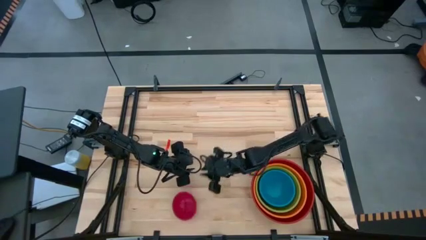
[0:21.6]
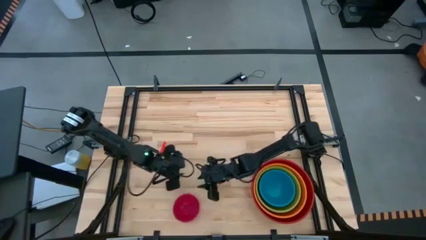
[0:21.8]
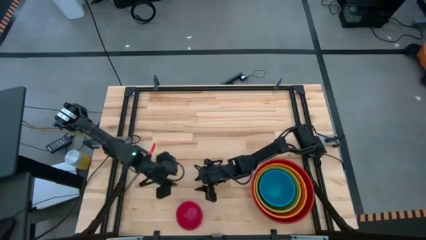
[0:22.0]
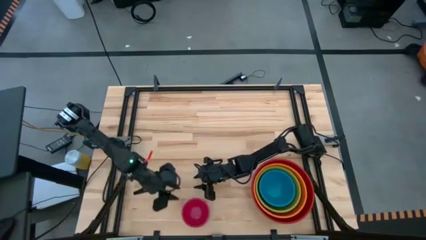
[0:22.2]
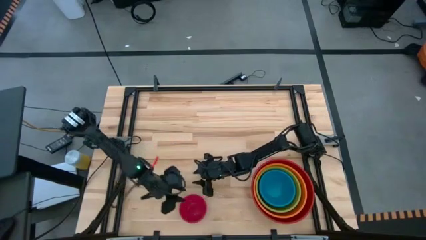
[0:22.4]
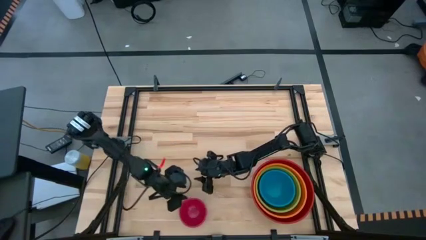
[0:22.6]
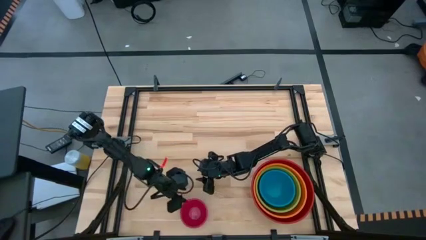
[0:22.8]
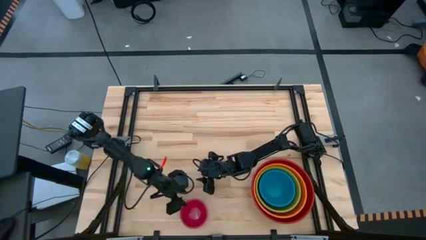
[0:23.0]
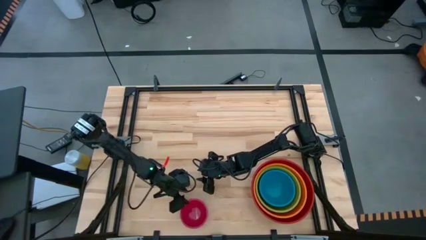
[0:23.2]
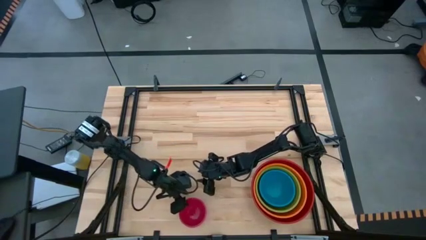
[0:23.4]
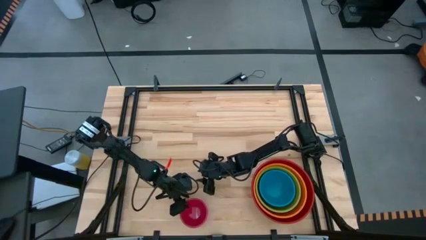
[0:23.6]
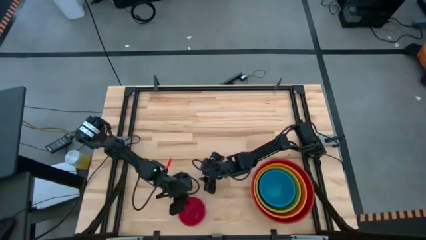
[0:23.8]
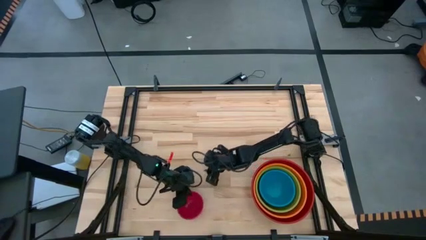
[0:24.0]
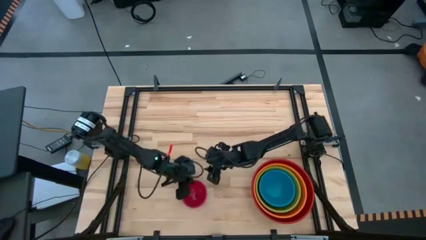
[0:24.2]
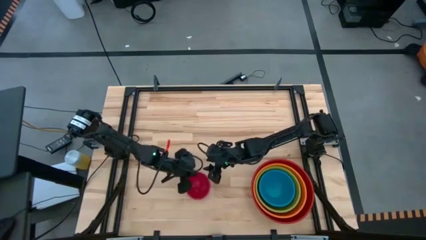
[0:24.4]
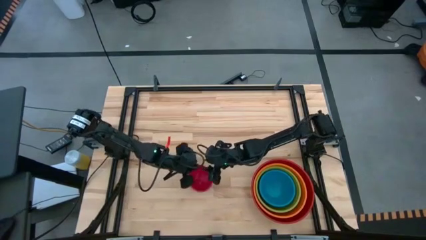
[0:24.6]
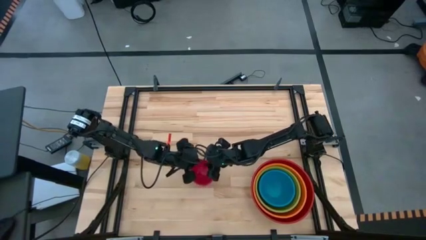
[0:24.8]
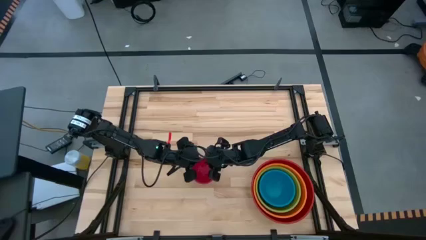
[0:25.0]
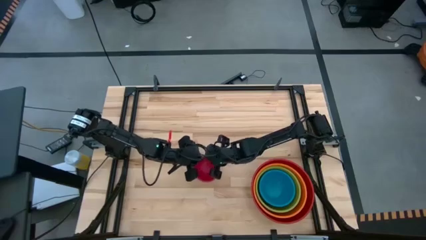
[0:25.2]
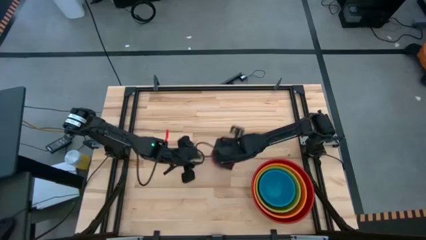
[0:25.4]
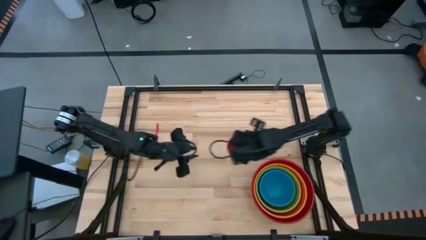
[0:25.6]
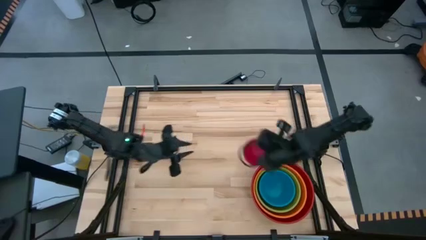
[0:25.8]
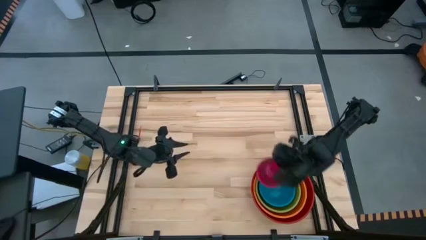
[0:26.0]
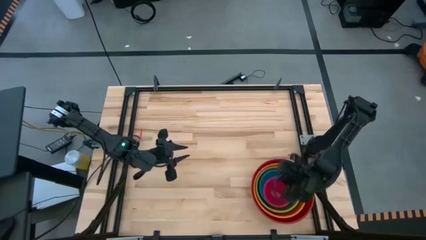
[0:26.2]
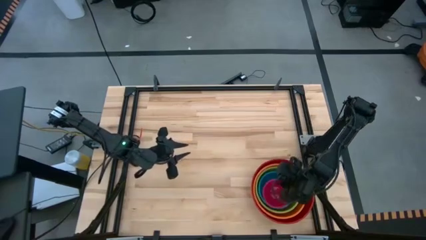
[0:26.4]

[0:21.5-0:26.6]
Stack the pink bowl on top of the blue bowl

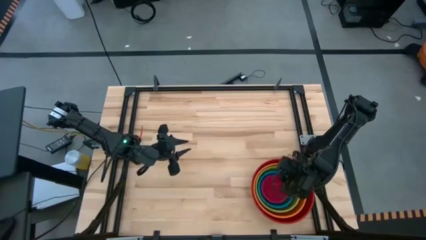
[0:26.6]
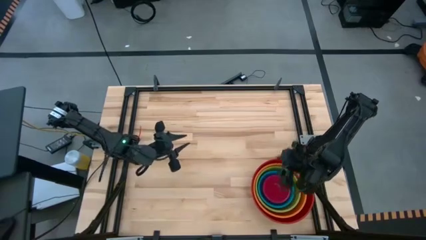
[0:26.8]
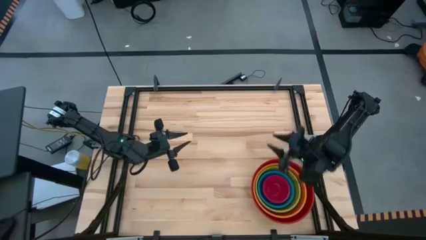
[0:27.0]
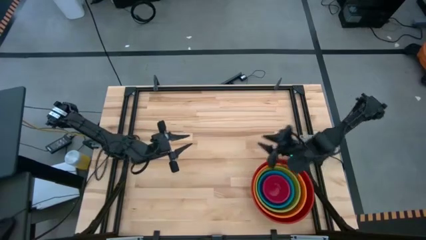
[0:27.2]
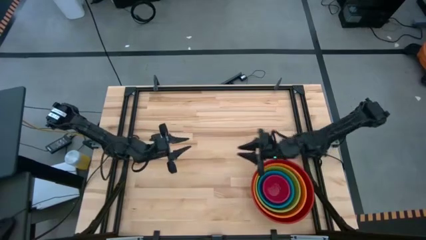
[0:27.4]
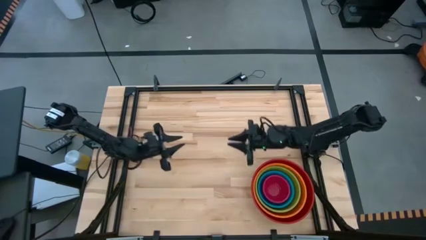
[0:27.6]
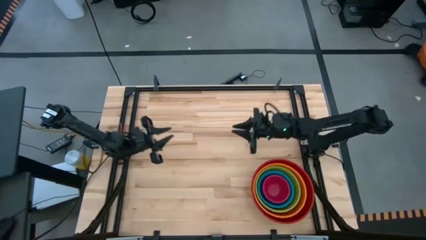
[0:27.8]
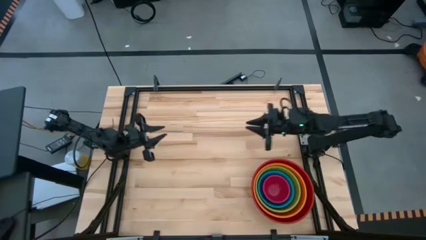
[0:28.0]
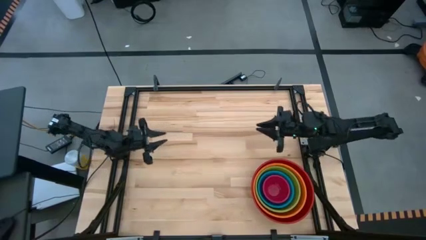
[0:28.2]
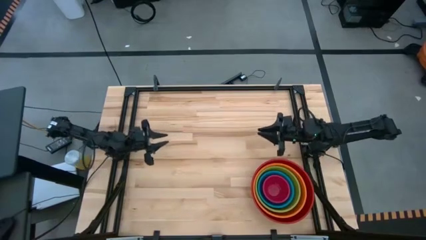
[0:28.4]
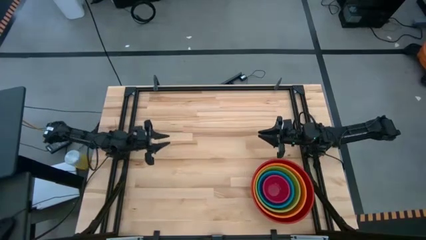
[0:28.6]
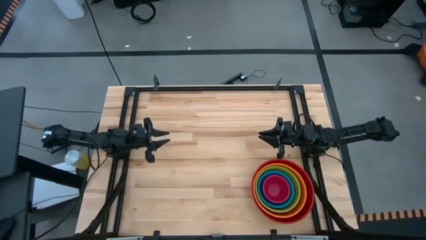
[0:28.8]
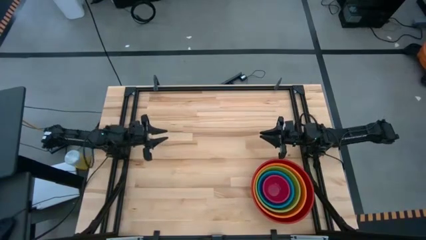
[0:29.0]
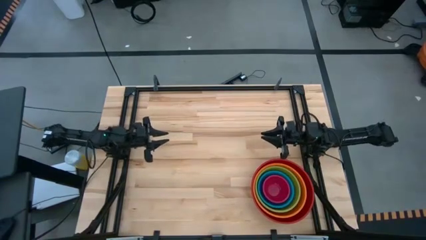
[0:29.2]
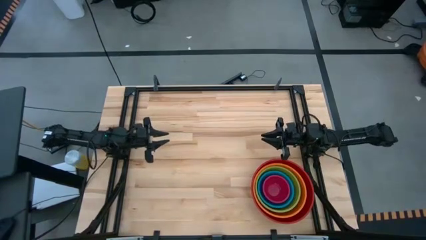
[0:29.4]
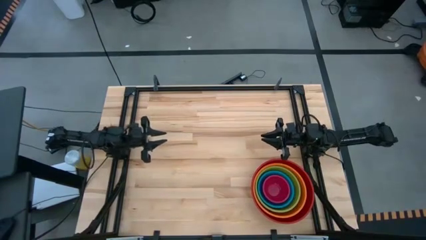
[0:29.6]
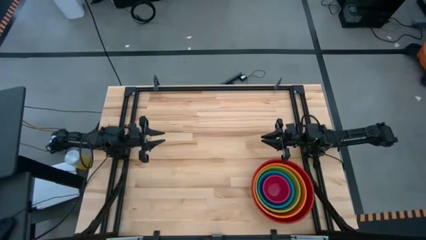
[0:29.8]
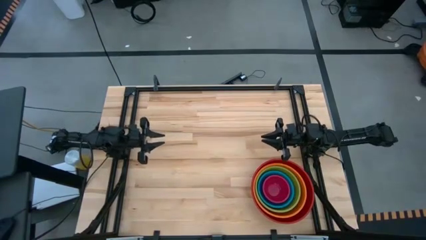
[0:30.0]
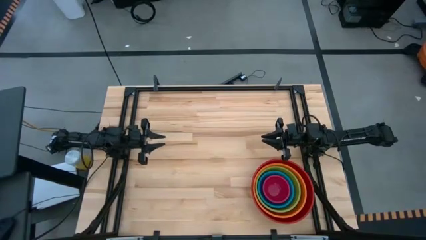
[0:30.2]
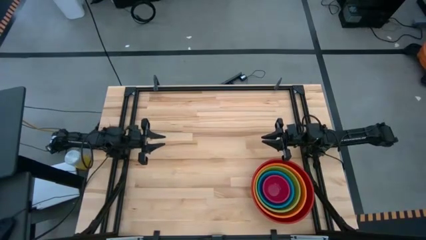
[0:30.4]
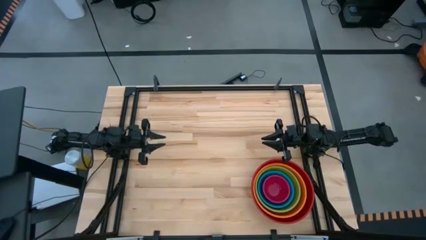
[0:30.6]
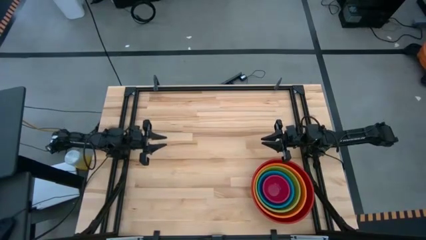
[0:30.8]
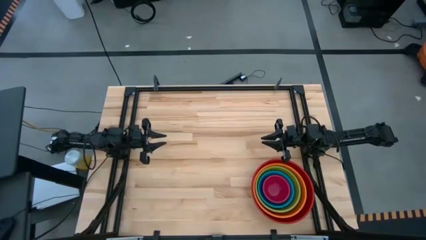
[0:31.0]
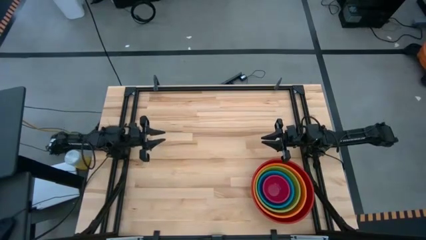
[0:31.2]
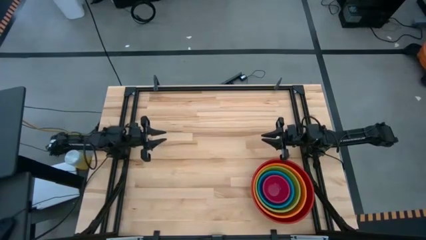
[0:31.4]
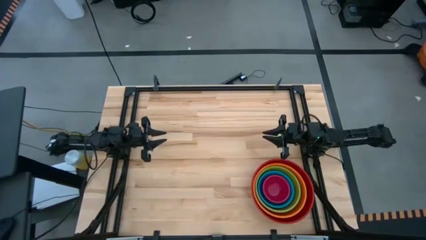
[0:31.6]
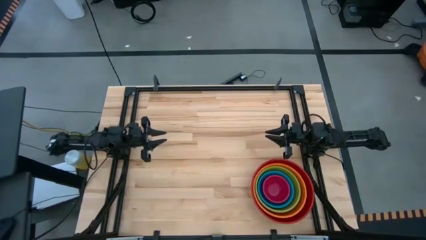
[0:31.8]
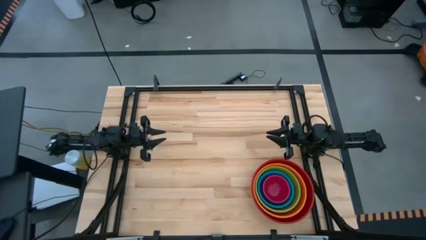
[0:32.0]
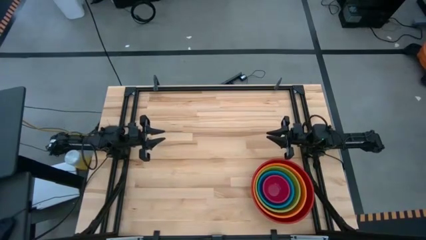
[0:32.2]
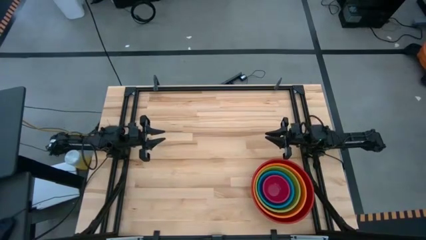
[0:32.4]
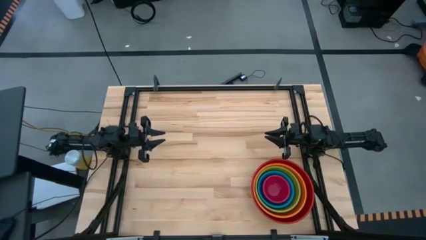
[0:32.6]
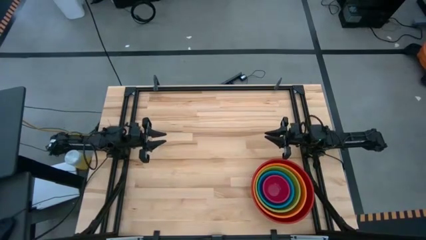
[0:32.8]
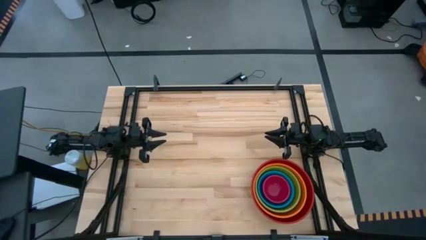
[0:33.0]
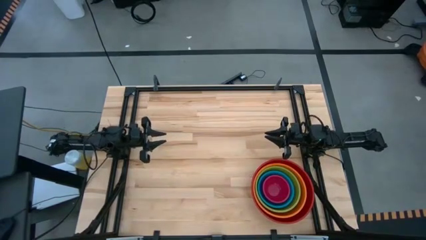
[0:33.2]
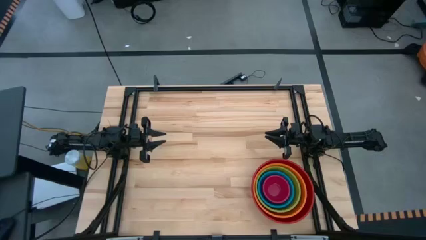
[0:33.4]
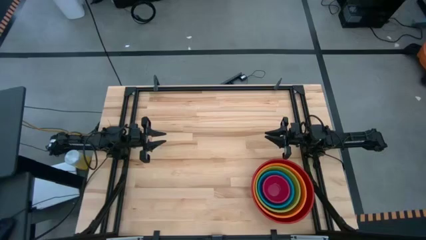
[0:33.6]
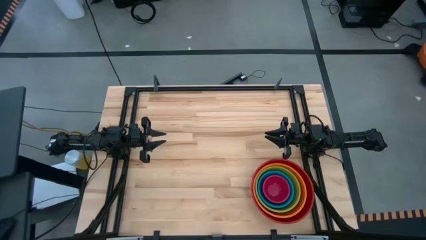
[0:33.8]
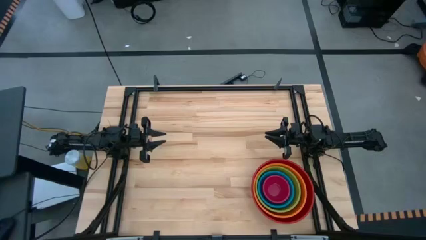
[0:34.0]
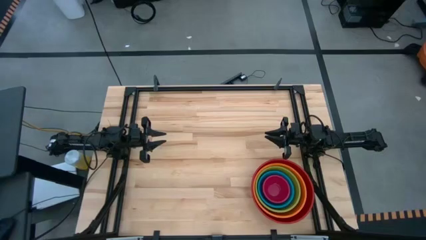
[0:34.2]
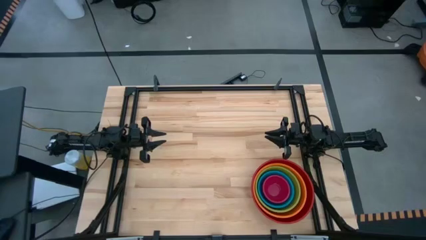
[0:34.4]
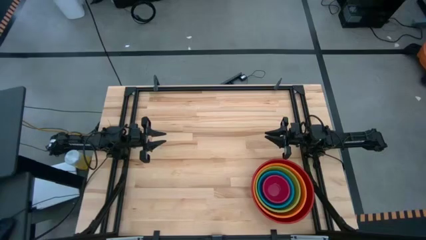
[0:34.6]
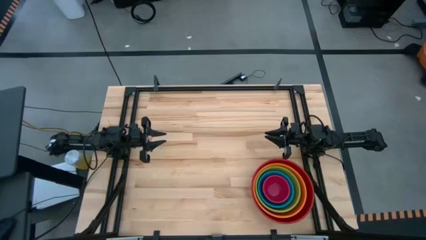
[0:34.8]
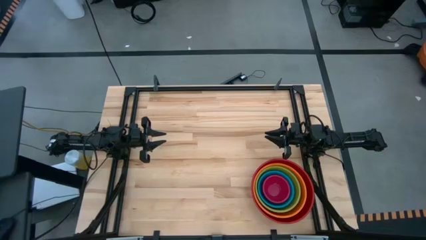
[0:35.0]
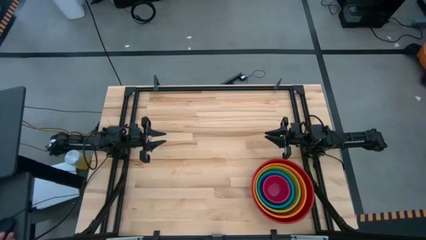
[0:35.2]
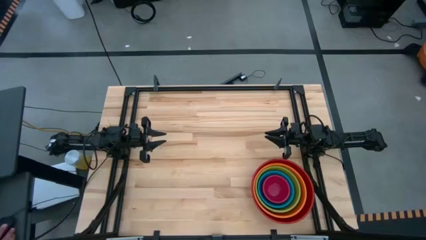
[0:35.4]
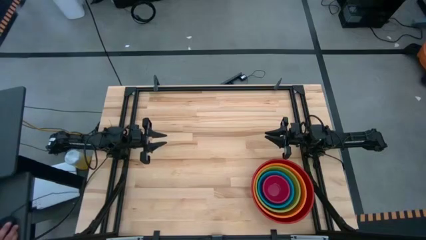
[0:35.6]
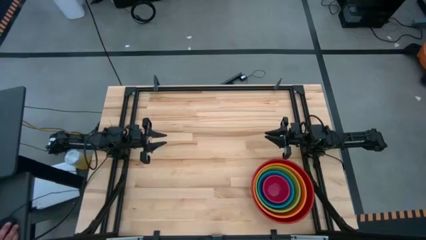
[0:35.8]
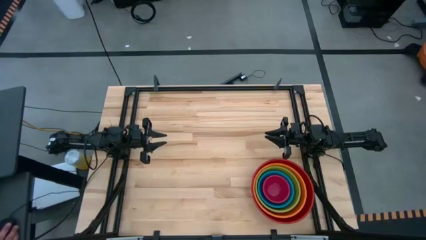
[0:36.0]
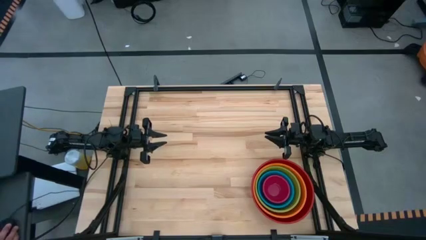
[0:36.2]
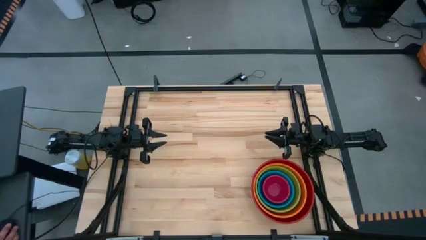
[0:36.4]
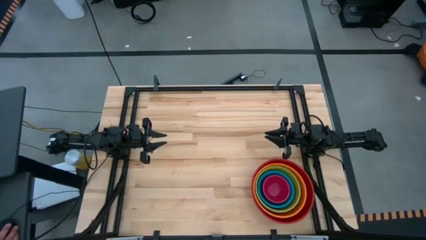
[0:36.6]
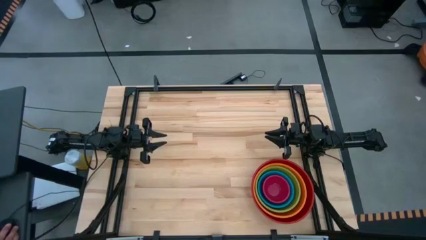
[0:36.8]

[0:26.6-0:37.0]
Return to Home Position

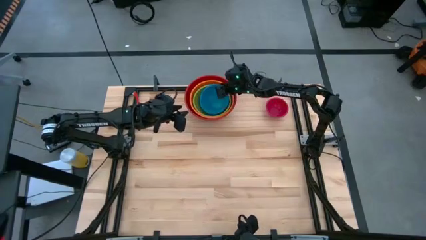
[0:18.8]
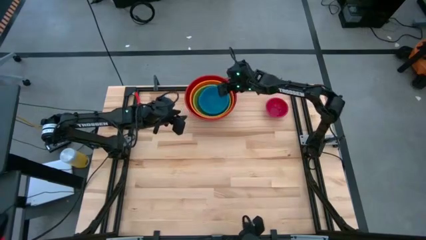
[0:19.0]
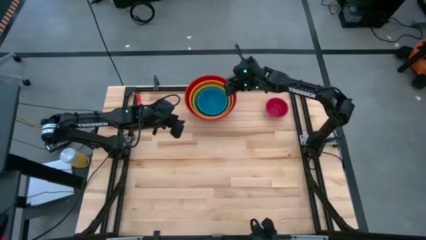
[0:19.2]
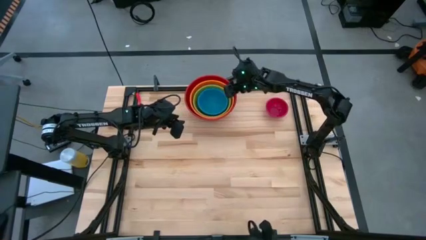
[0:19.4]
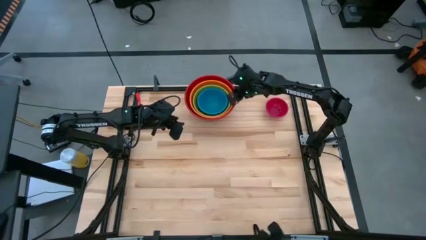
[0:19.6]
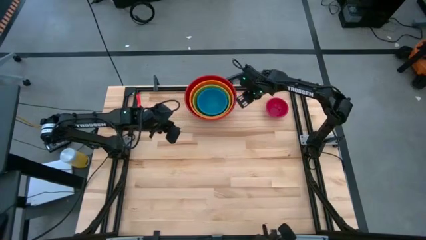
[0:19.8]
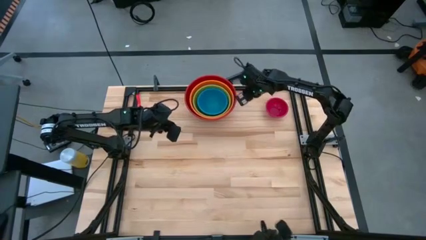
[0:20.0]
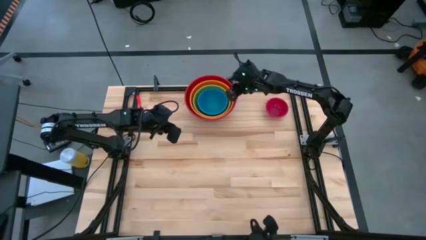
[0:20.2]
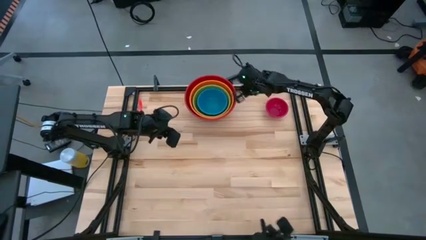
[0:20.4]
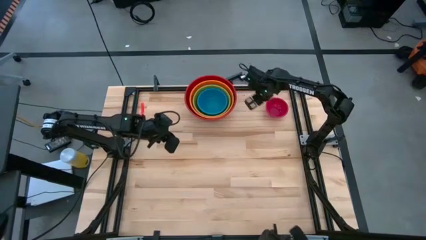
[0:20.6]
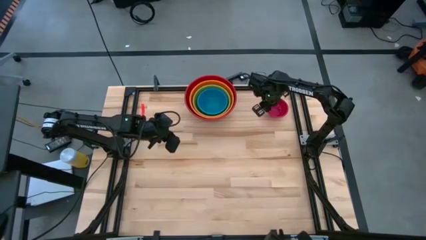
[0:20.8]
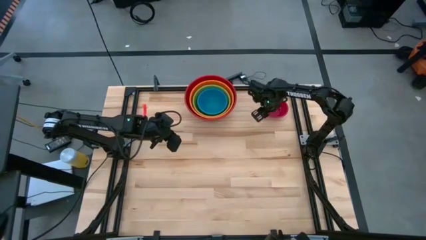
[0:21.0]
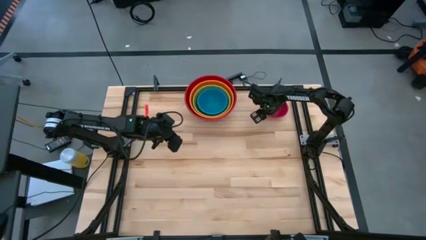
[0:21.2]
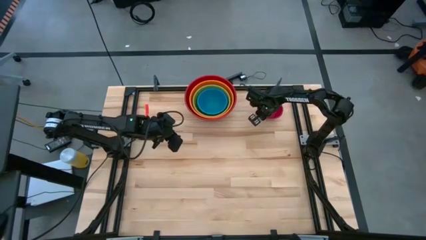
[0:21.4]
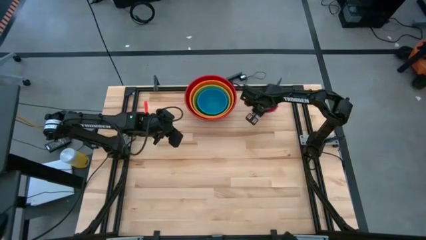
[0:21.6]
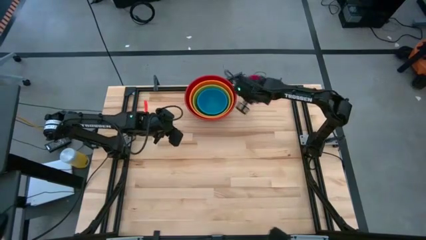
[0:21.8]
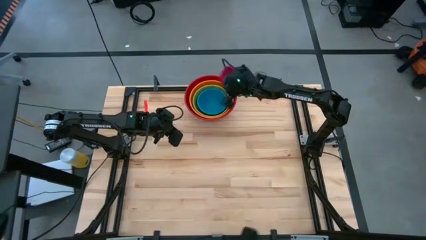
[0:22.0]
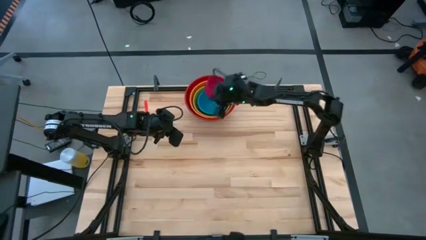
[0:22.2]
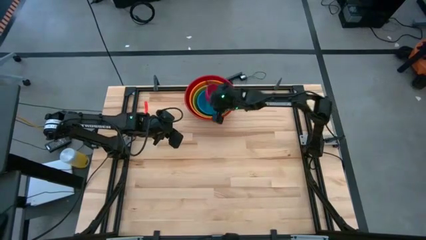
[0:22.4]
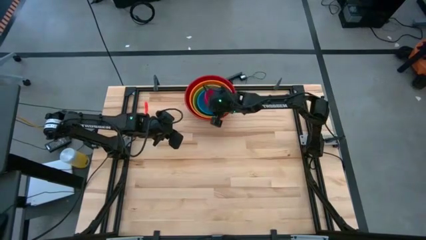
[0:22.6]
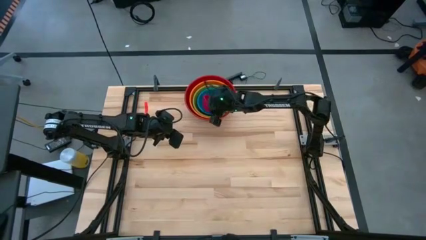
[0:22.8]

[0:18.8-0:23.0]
Stack the pink bowl on top of the blue bowl
